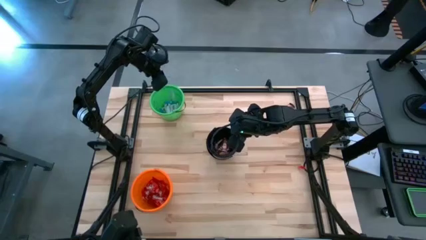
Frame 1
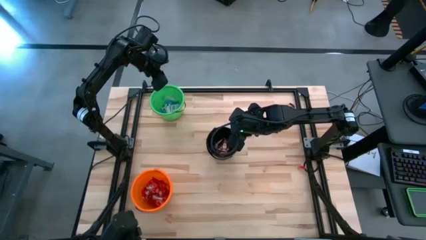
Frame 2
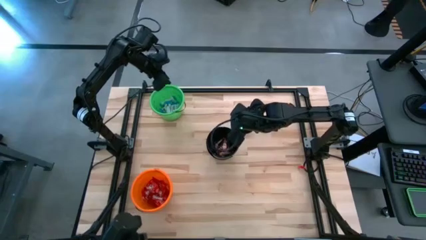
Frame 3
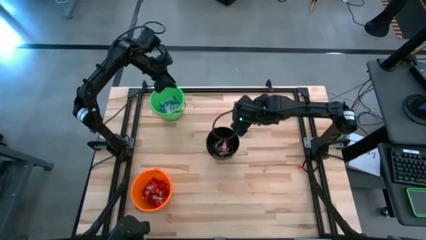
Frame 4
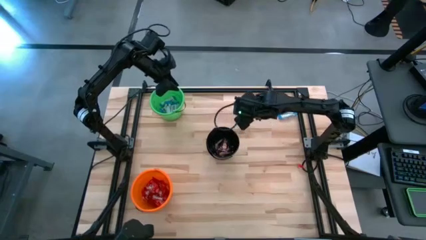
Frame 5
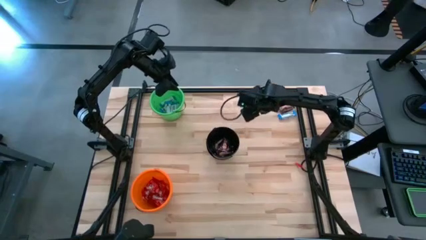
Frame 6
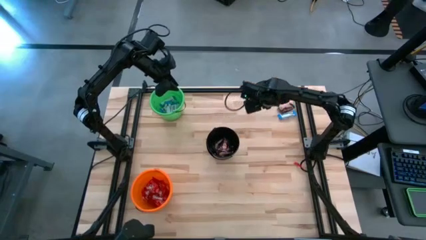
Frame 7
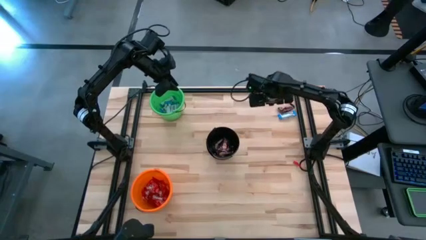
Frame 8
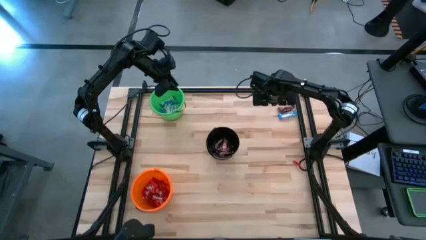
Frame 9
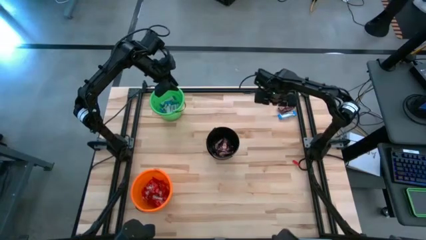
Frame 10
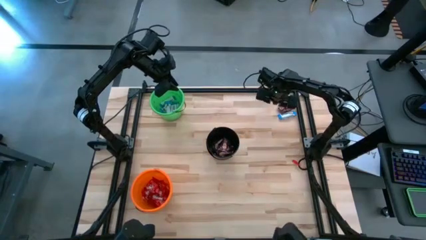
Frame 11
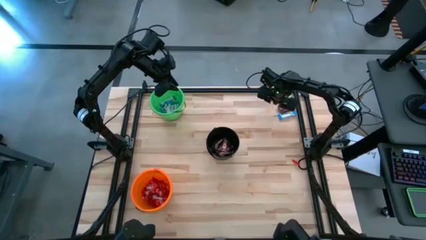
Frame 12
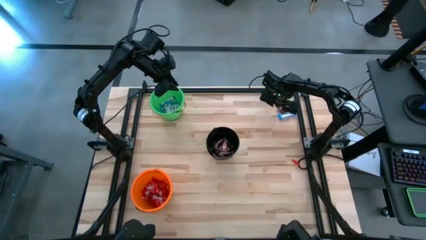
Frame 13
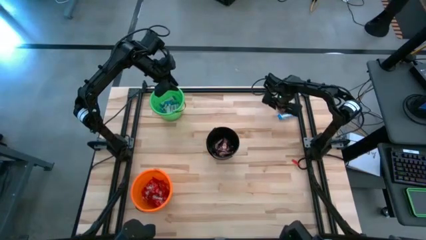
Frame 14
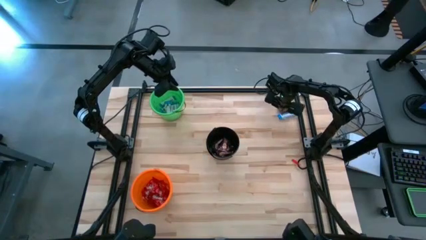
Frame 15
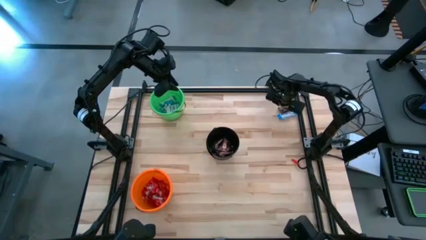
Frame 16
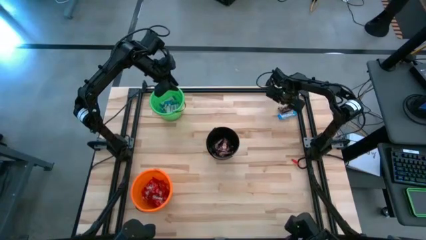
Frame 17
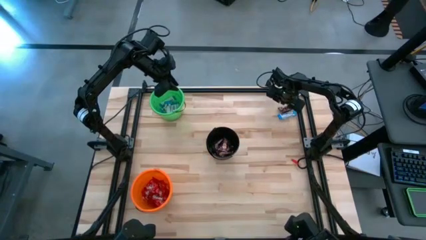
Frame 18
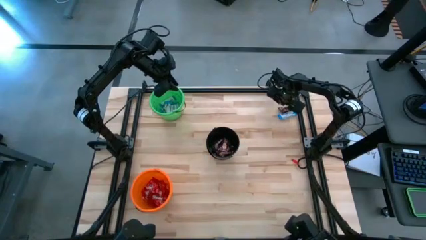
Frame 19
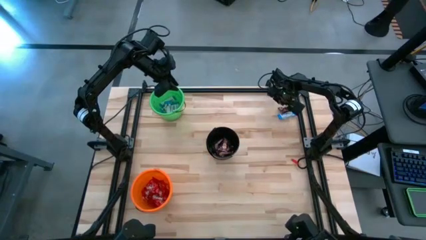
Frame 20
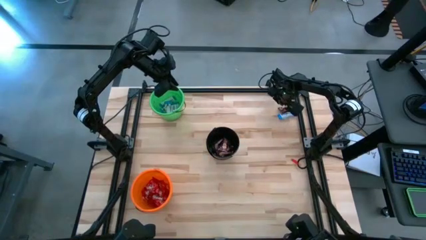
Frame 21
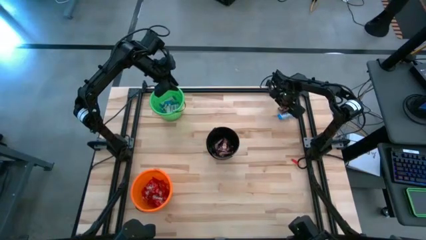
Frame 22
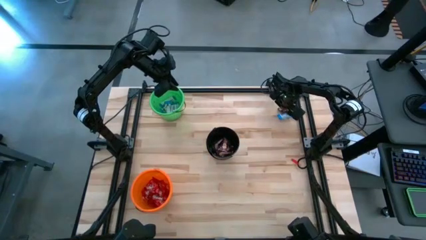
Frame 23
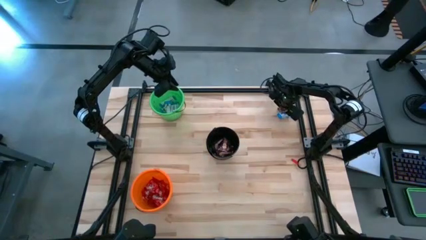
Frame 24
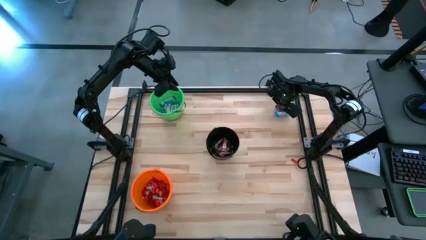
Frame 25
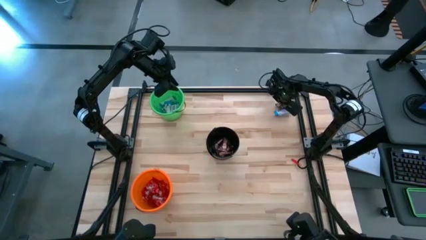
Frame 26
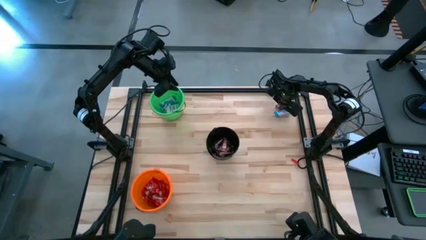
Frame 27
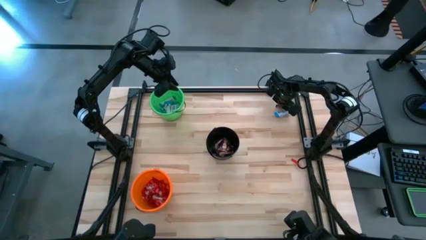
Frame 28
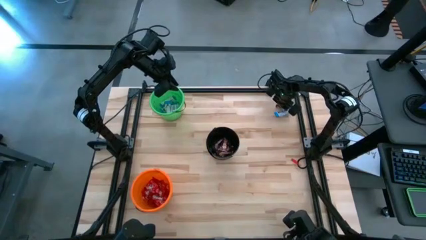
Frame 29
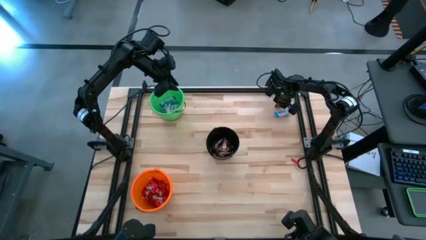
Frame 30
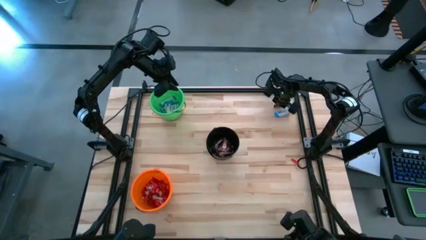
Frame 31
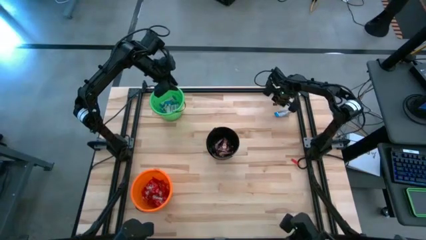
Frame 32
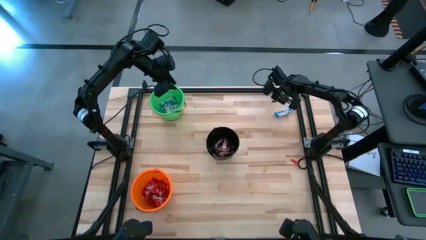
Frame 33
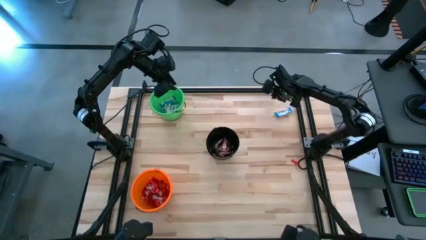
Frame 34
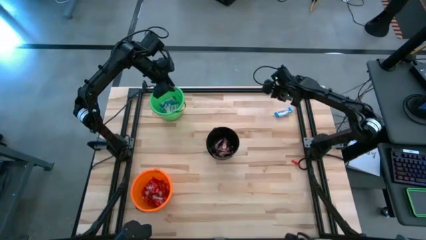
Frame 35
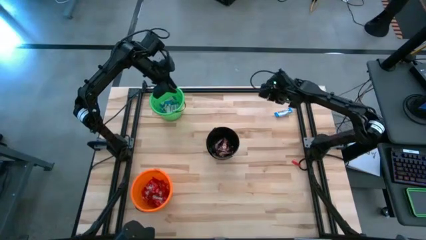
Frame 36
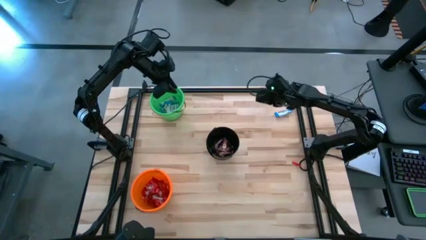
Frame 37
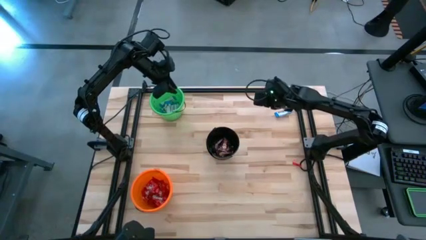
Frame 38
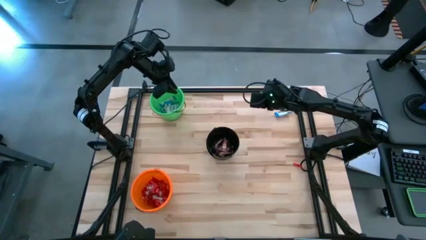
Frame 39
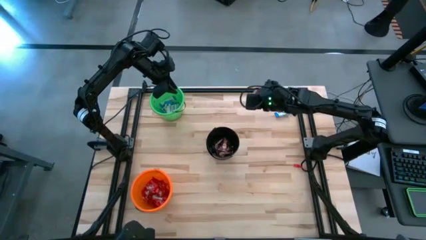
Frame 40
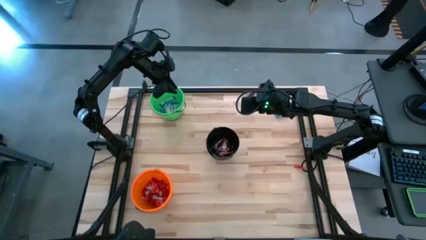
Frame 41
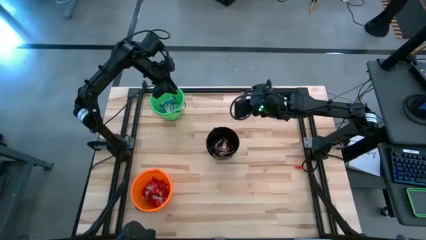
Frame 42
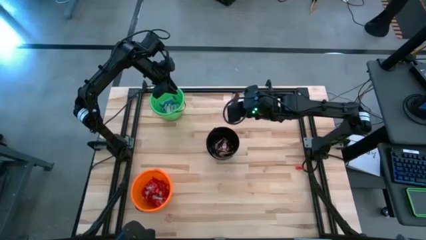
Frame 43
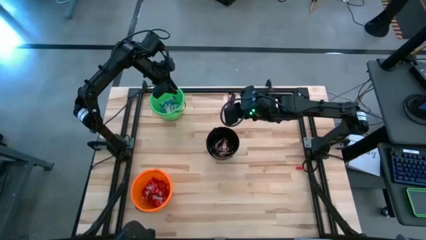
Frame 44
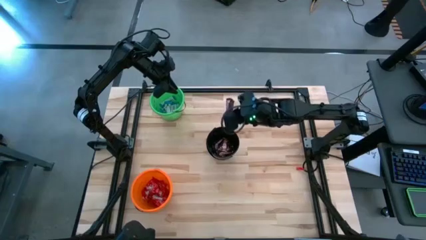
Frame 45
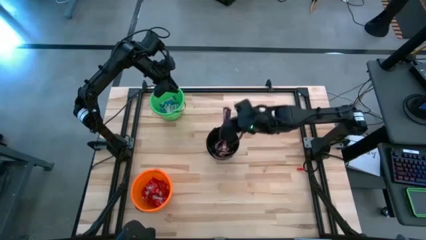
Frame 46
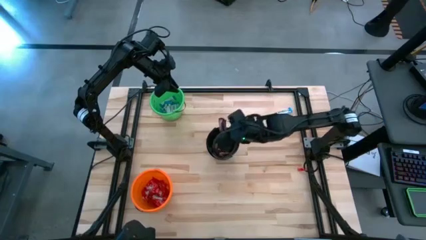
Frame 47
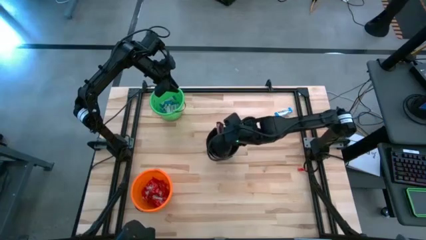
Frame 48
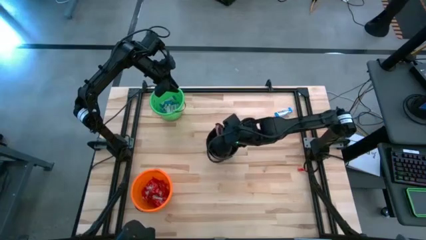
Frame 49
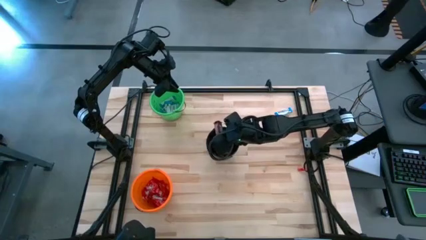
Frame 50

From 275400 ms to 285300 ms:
Task: Sort candy
Put the brown chocolate into the black bucket

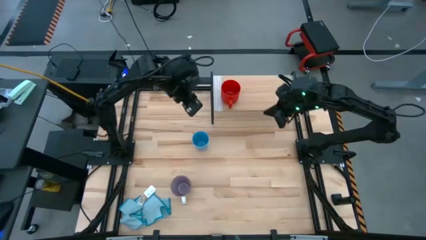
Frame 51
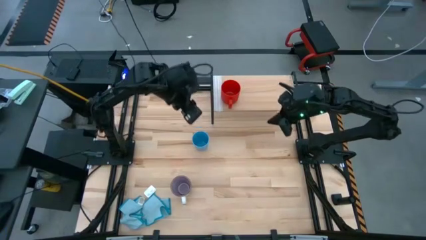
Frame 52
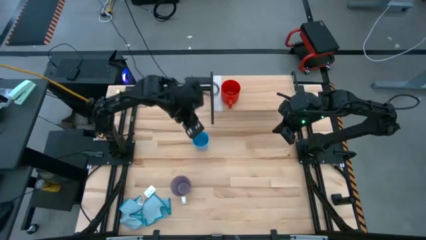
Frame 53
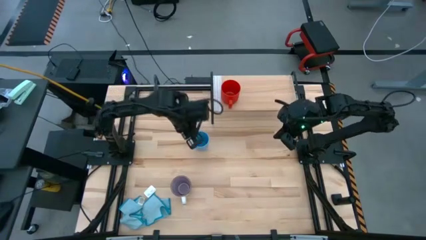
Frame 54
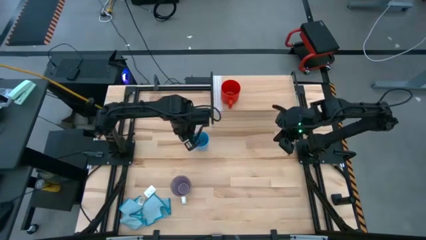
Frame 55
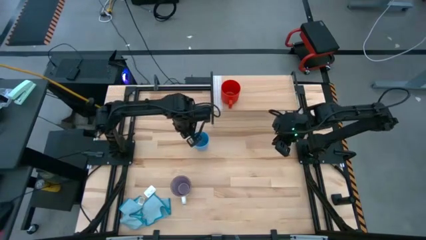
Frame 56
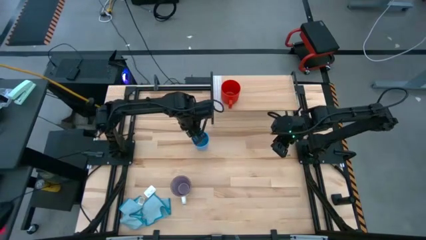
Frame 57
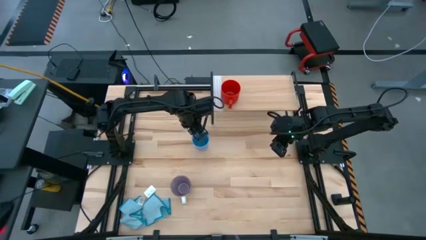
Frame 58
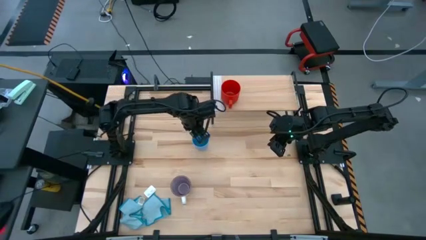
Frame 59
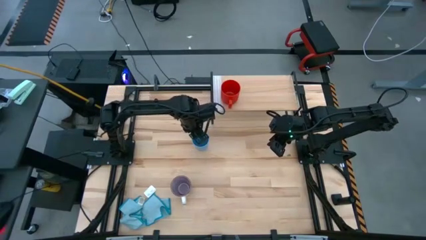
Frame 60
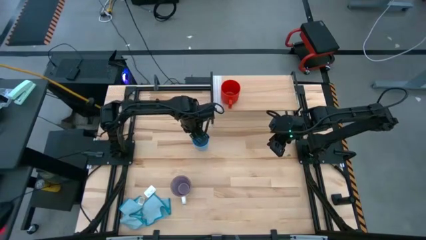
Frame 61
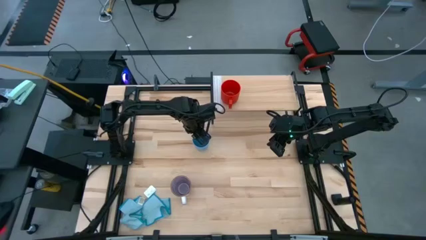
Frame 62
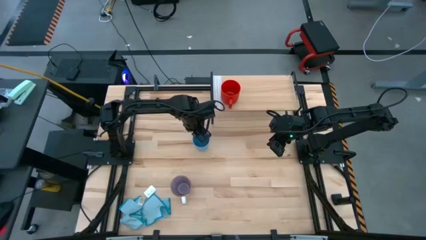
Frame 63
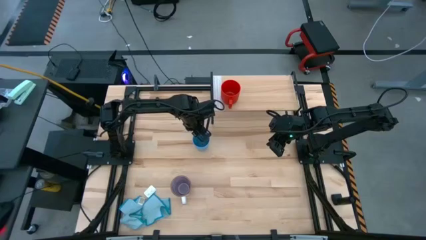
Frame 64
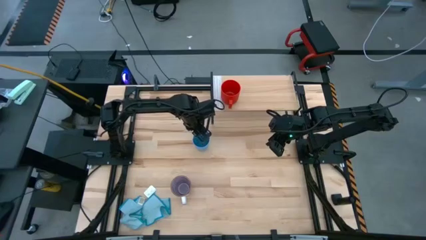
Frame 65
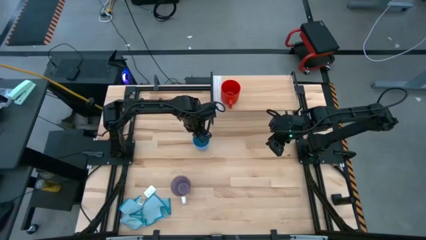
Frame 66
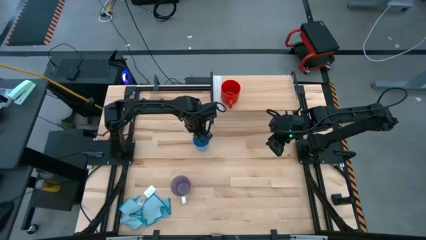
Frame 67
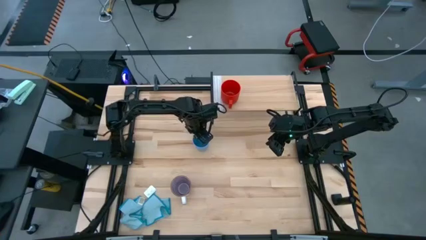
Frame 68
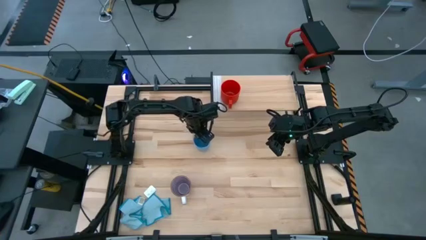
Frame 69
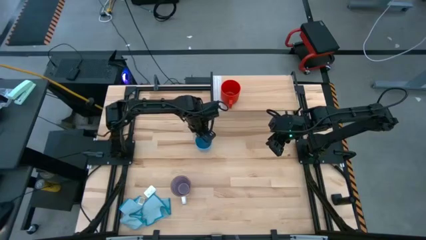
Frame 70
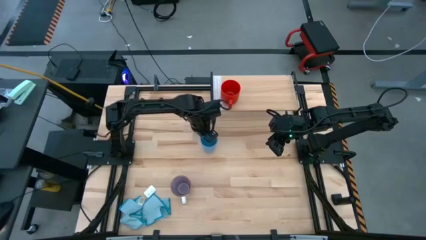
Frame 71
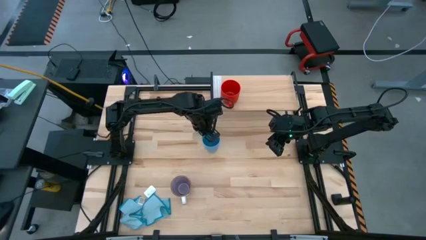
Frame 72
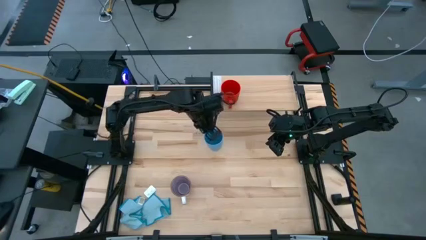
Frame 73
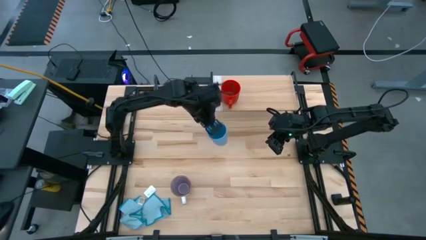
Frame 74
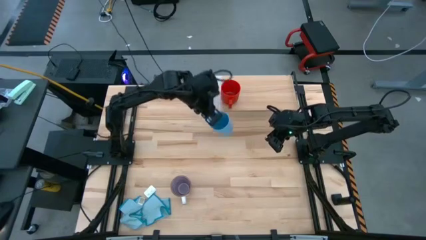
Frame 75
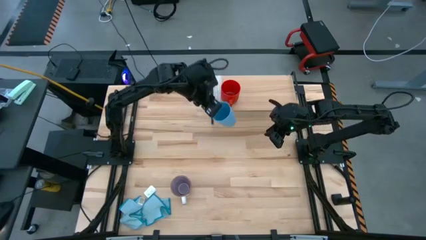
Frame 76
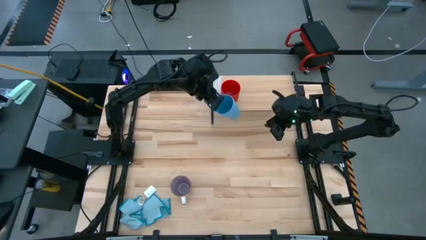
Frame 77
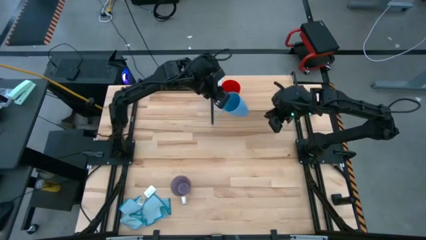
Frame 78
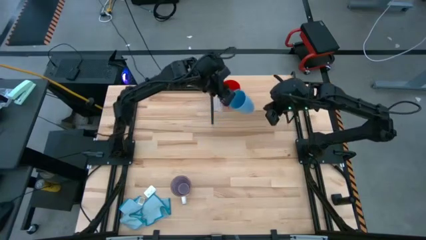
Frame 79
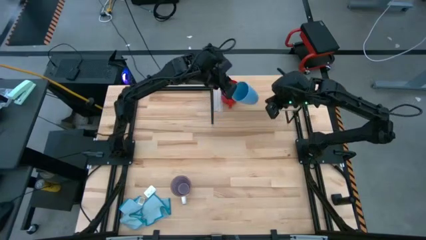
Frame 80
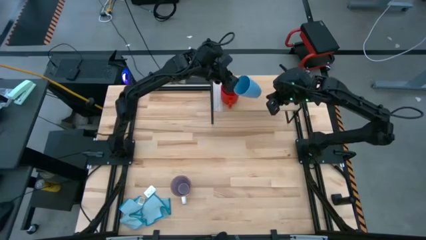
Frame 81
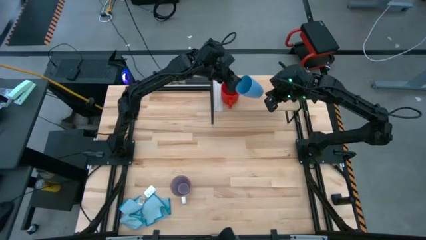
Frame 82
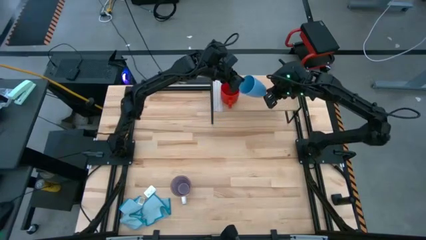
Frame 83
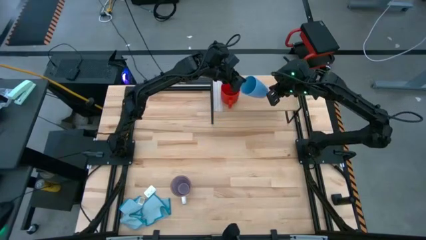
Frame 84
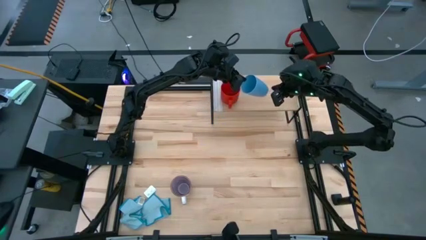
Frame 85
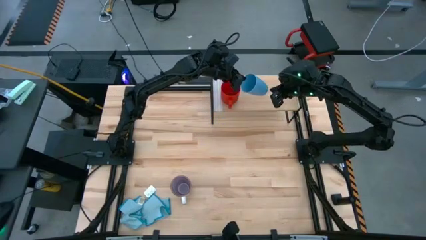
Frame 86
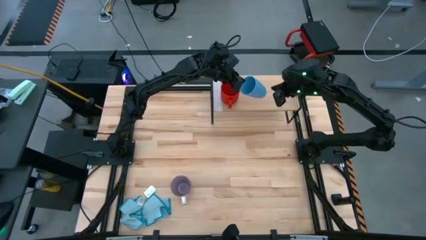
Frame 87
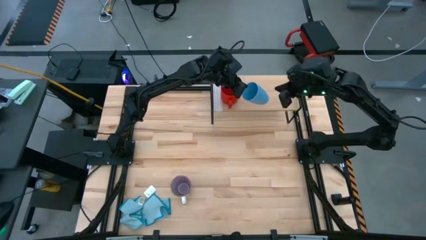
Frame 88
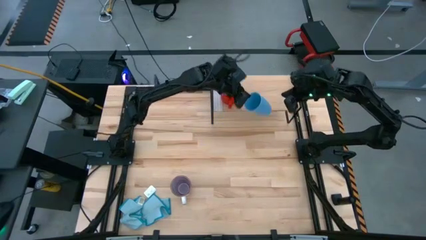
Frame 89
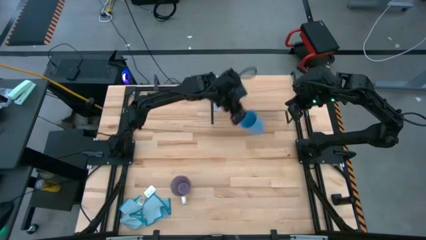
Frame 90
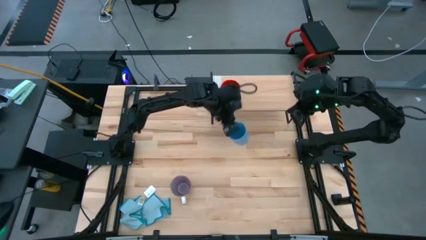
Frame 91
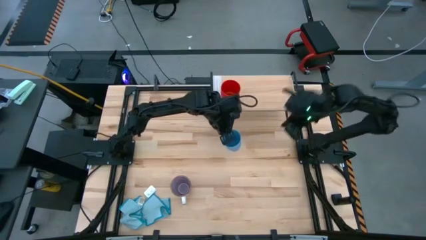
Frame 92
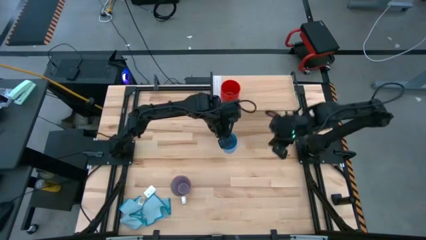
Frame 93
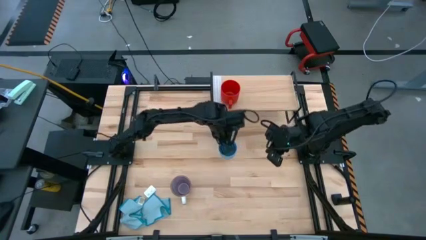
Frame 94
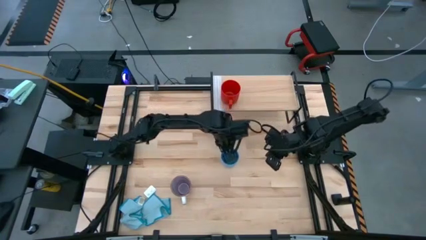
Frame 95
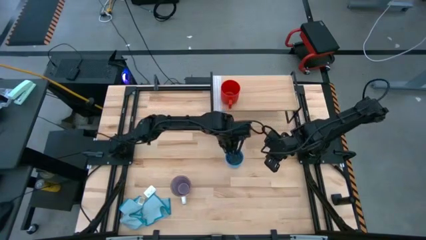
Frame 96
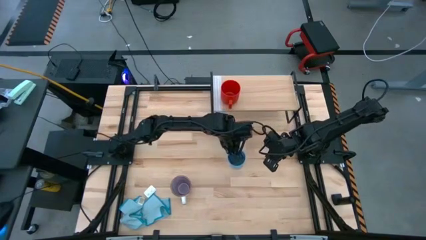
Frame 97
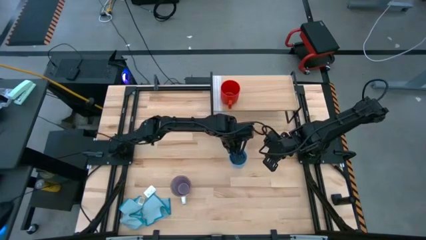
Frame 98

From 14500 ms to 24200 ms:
Task: Stack small to large cups/mugs on shelf
Put the blue cup on the shelf
